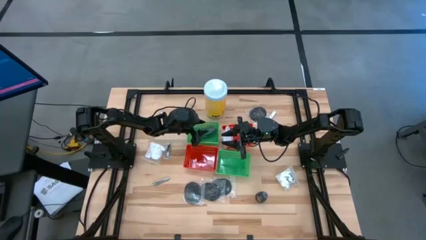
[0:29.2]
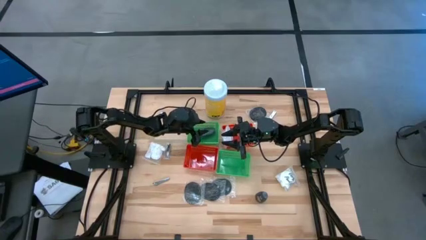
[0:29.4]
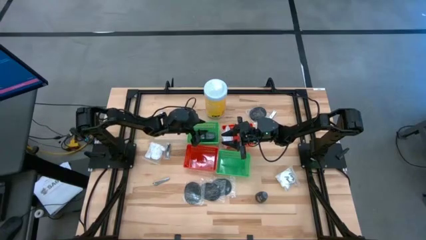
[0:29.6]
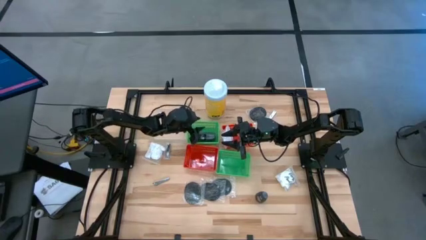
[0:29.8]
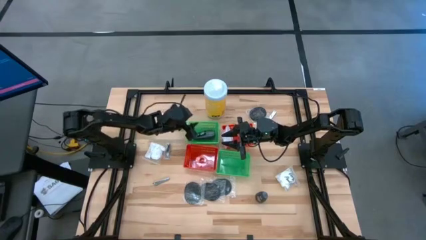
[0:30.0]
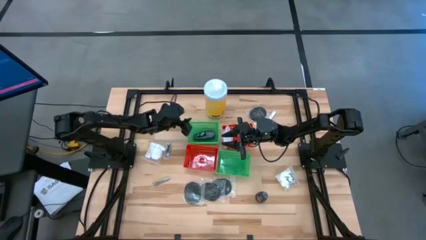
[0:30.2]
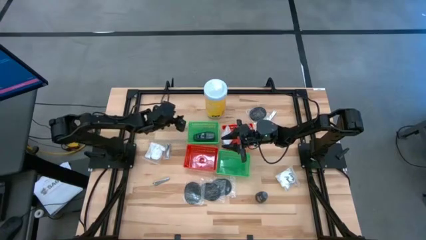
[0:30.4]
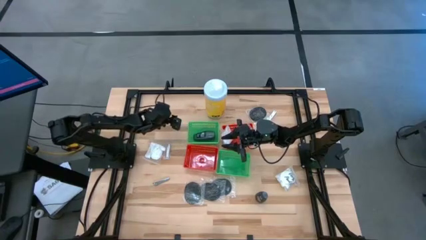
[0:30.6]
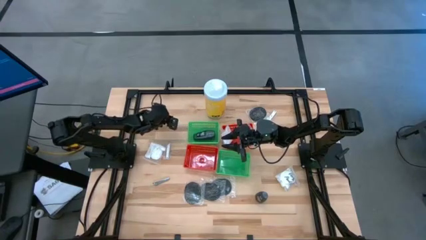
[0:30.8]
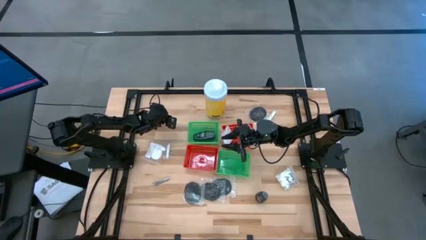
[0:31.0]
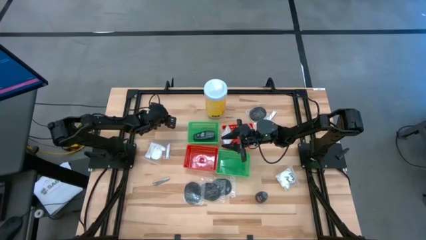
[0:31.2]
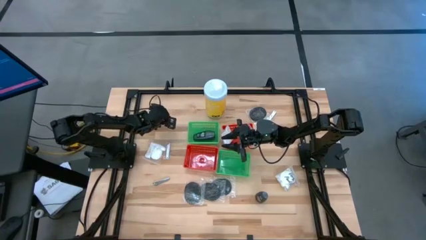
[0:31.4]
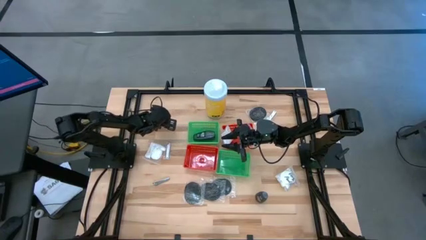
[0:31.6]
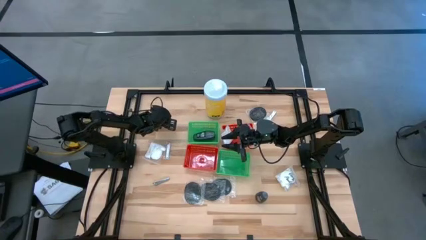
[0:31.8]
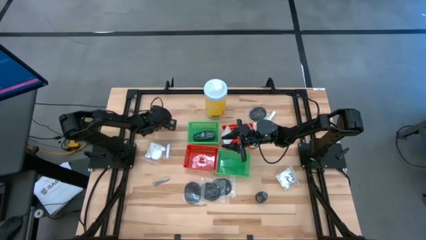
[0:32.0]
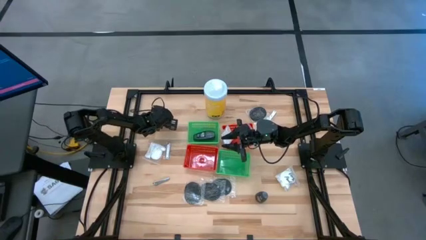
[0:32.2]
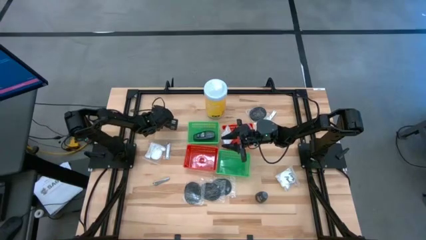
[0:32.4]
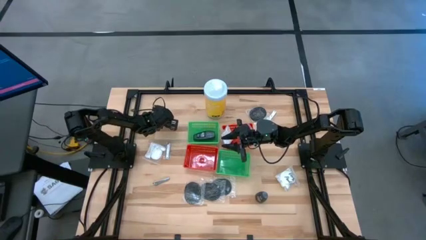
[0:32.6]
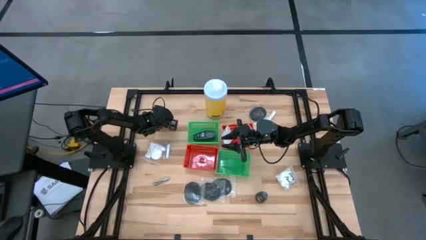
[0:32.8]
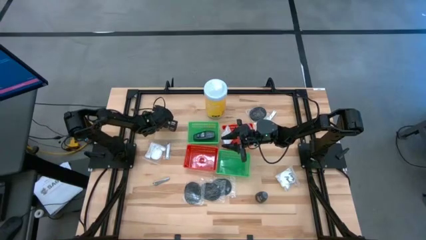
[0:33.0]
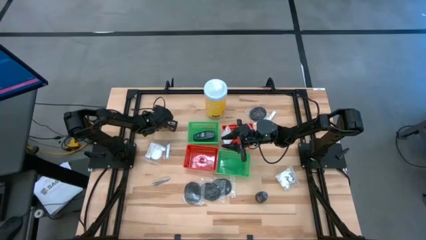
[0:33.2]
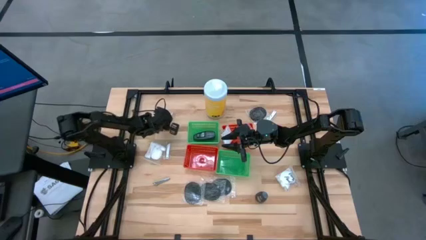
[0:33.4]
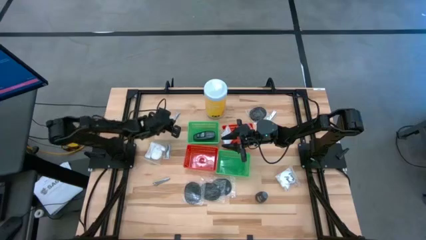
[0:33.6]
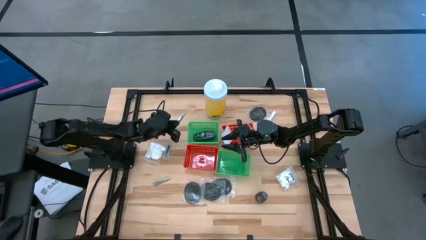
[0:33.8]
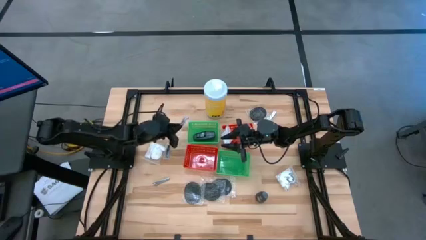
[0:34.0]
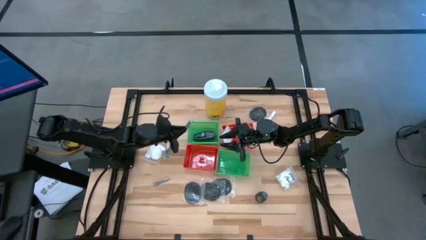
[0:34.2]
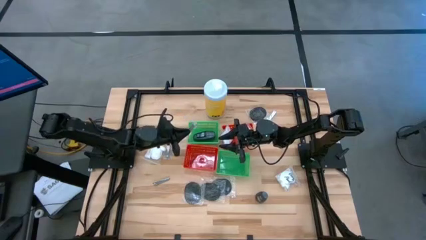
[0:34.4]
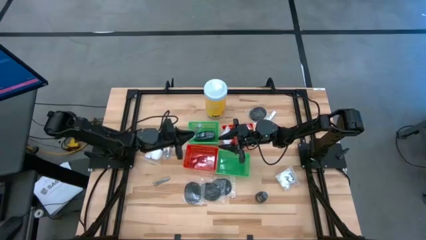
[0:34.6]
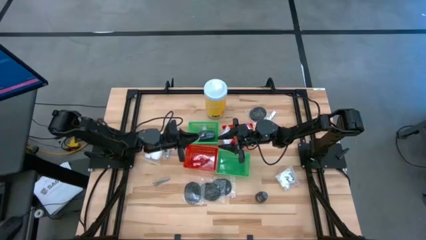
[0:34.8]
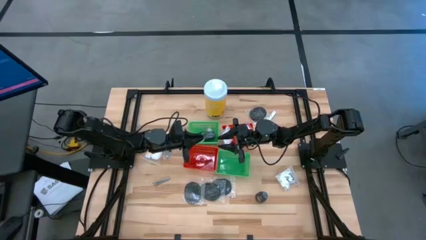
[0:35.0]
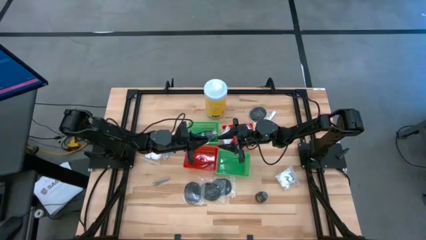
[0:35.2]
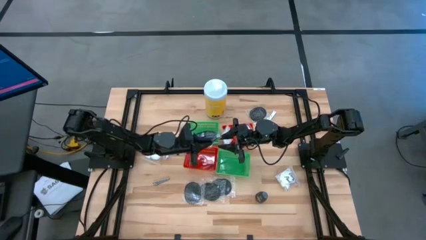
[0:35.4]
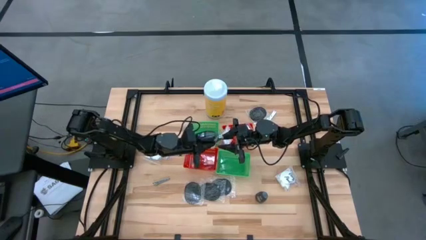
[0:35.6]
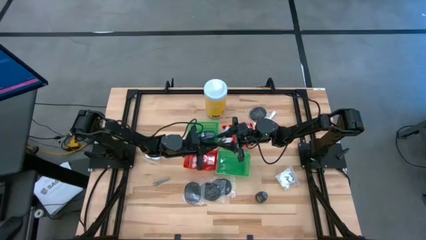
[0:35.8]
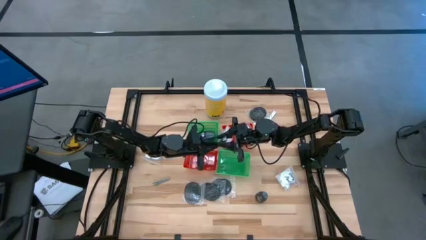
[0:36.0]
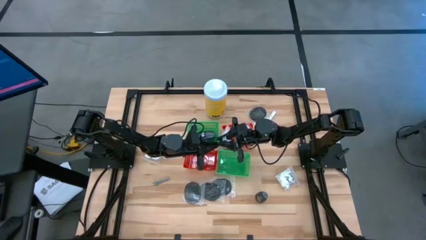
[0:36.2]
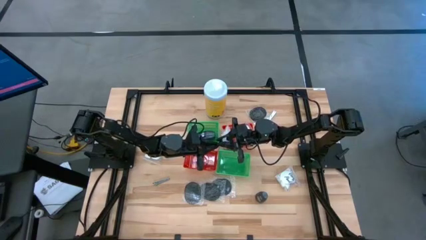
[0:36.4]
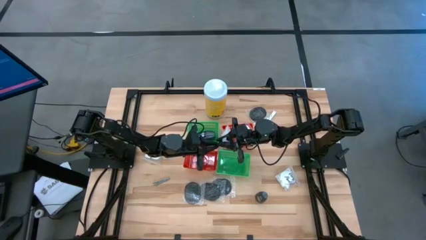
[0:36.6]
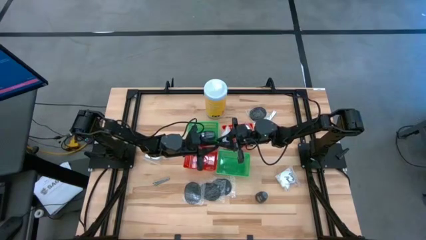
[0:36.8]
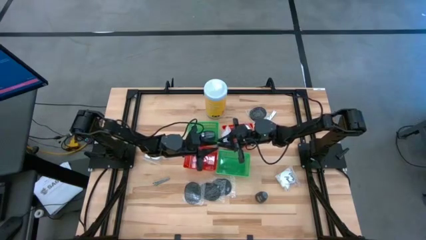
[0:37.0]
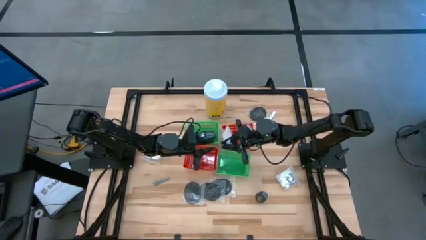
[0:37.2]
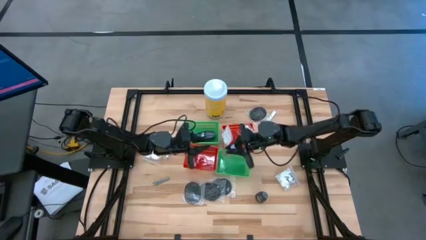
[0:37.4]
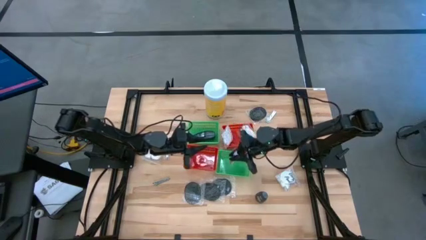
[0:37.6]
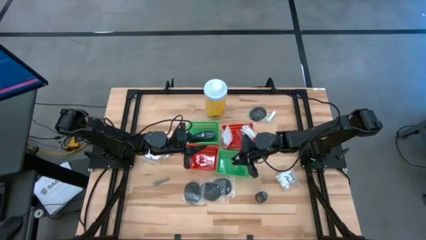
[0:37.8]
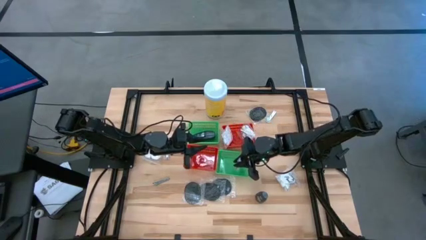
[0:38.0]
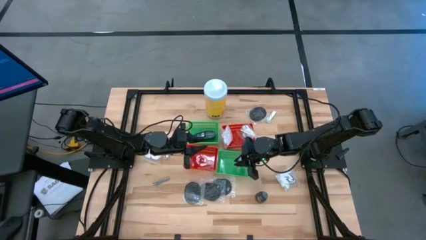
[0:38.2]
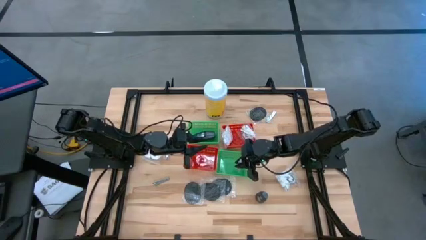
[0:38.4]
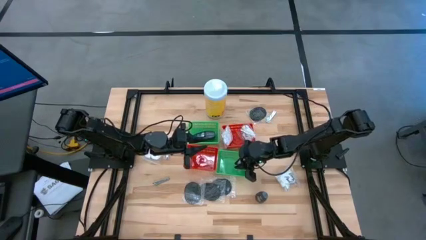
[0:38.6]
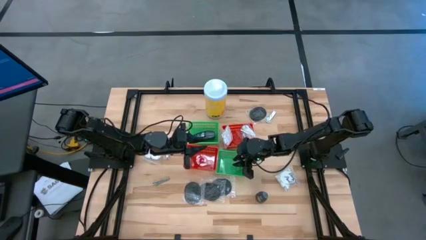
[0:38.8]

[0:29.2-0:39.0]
Task: Pick & Place Travel size toiletries
Put the nail cutter into the right green bin

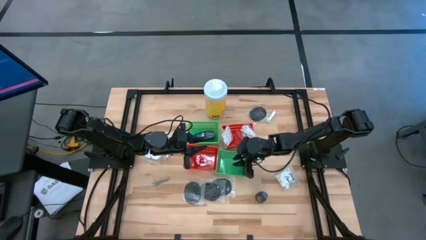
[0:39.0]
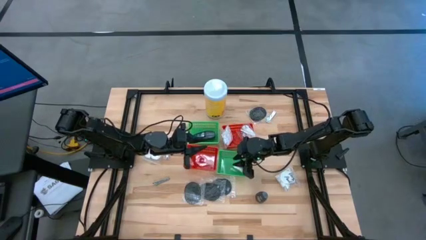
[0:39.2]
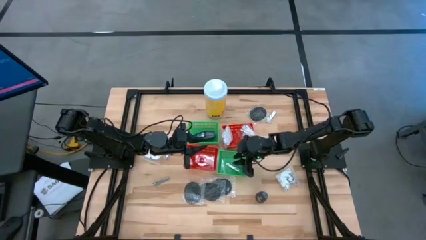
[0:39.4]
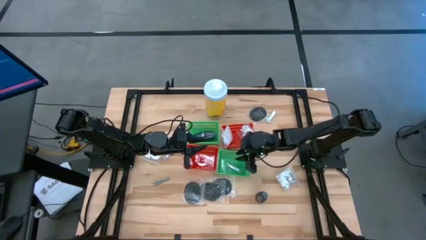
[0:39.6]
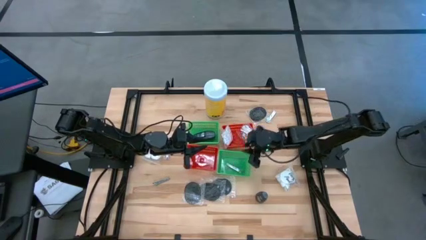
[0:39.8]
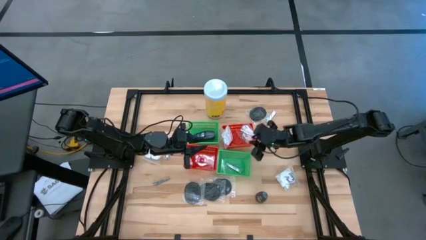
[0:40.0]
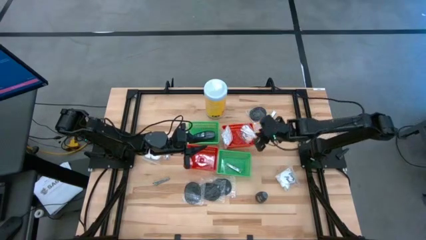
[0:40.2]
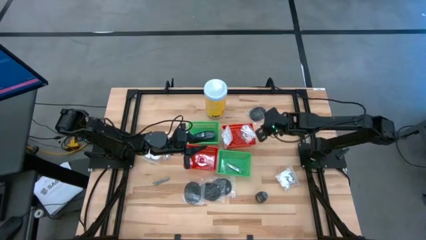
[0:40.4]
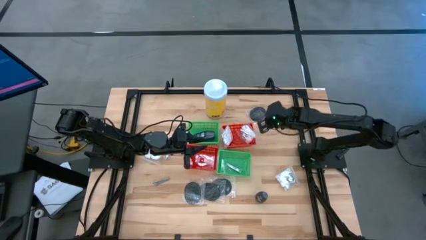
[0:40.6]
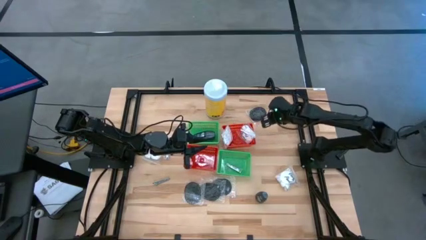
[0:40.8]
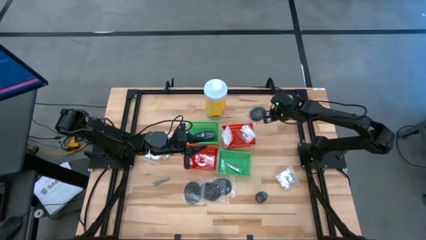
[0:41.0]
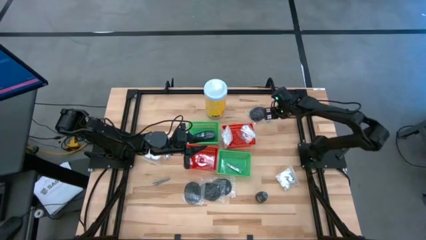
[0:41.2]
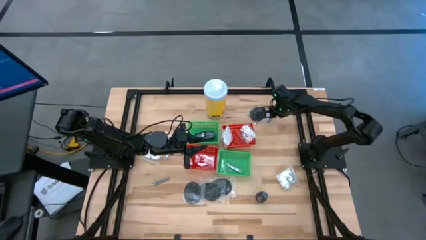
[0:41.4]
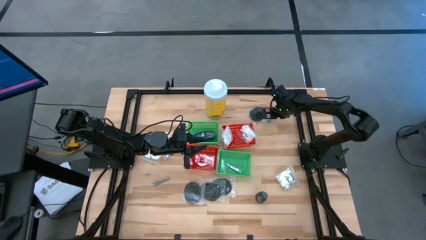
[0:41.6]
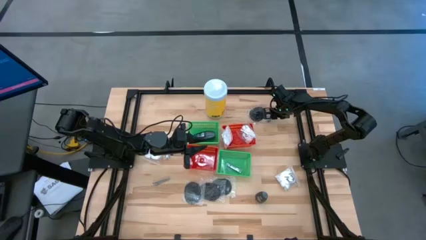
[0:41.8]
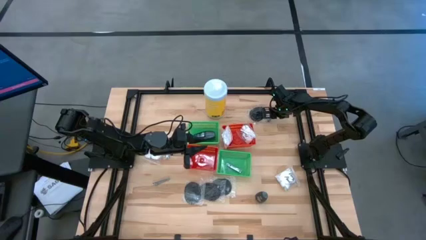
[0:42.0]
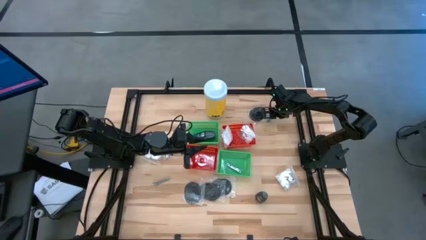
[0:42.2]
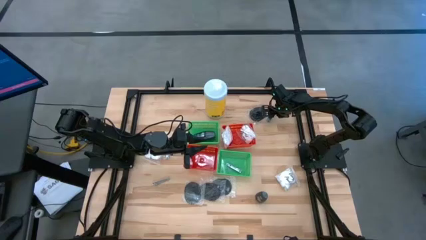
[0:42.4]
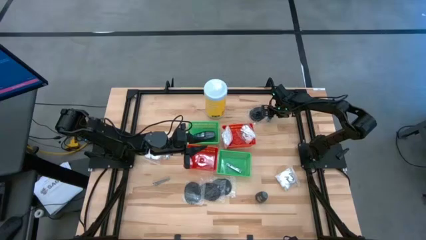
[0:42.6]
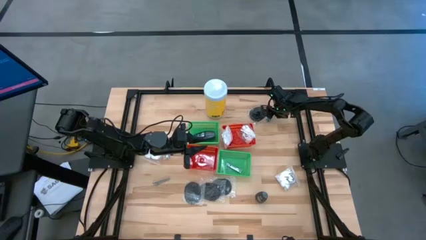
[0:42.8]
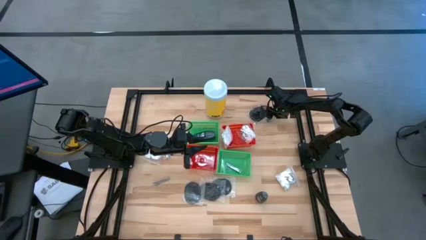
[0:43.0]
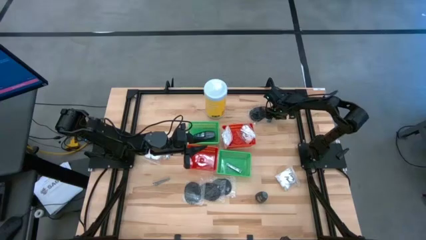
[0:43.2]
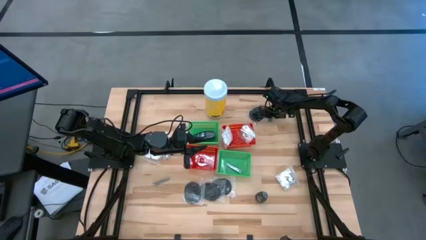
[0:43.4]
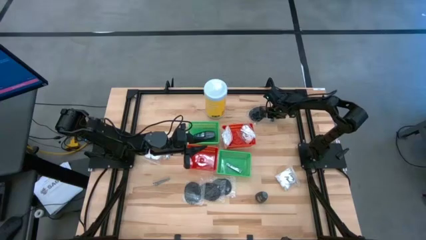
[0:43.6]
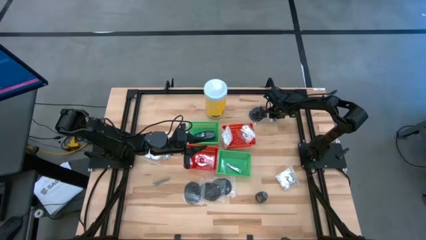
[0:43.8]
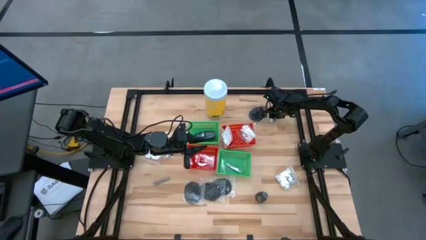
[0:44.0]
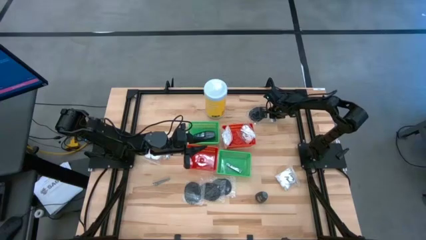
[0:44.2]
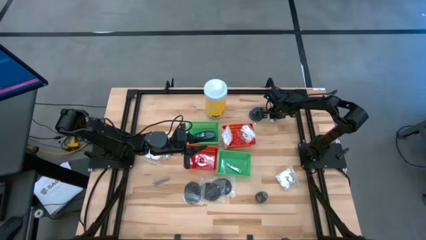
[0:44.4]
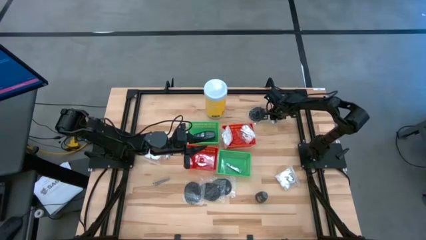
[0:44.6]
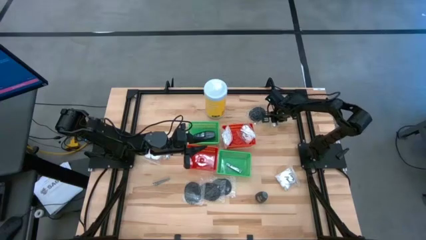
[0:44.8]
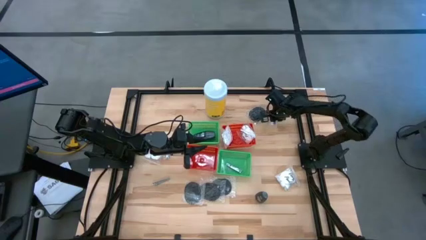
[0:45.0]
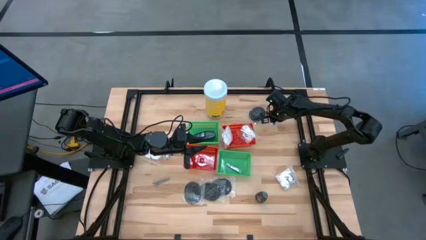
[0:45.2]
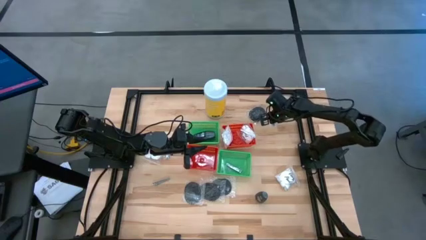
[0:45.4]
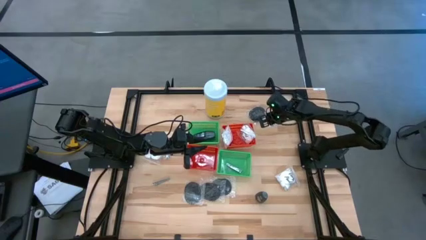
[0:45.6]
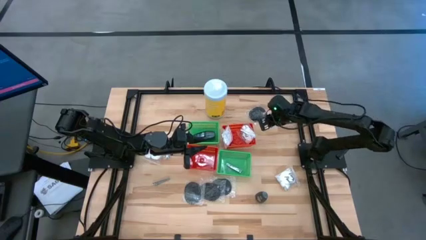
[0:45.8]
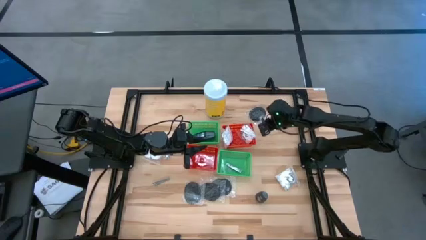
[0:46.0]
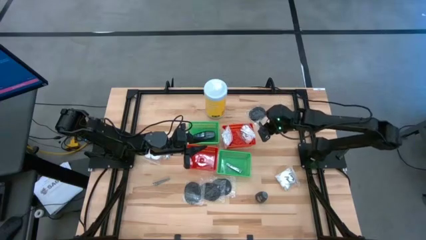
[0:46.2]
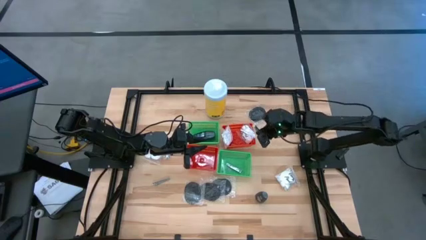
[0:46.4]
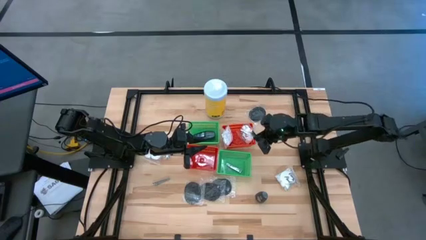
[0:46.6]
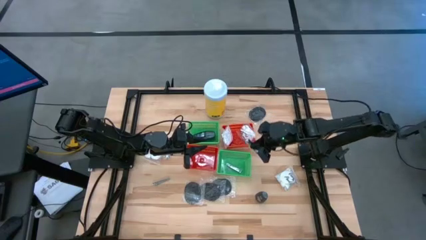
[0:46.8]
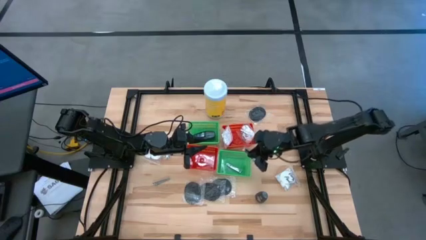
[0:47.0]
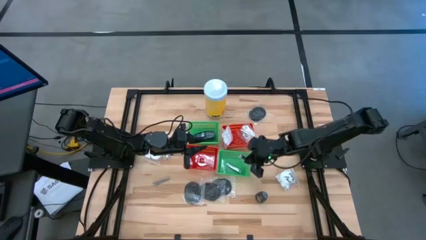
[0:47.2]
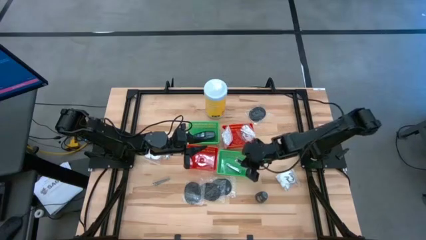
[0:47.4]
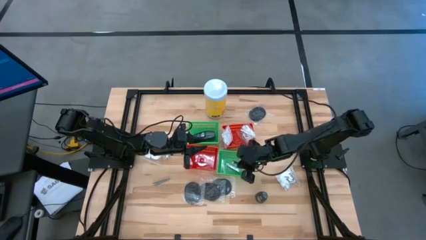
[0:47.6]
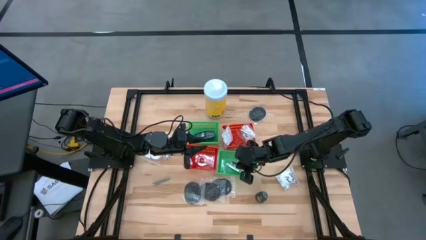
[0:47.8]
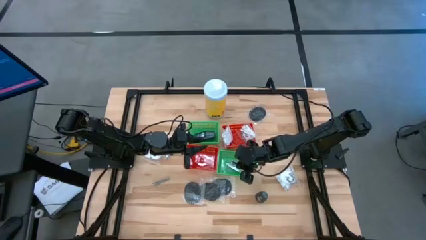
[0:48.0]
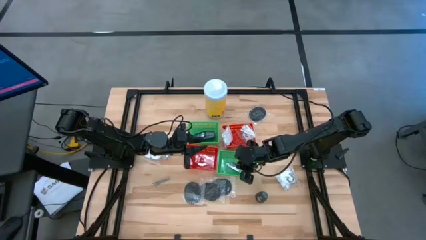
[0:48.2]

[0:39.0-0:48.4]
Put the nail cutter into the right green bin
